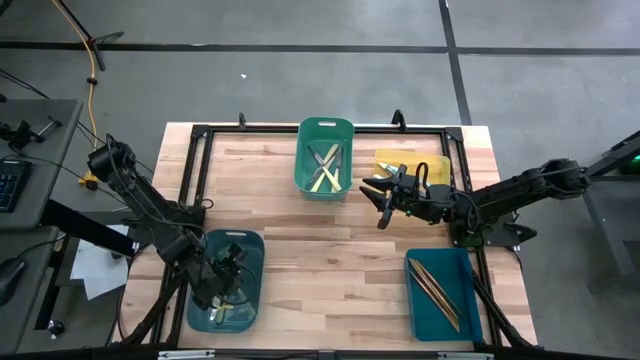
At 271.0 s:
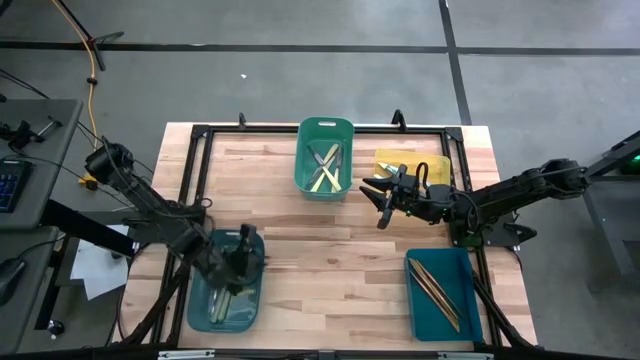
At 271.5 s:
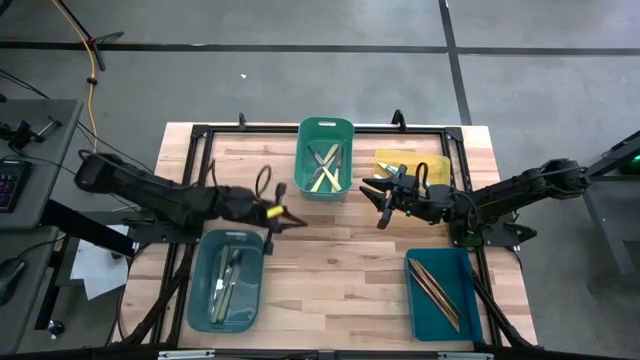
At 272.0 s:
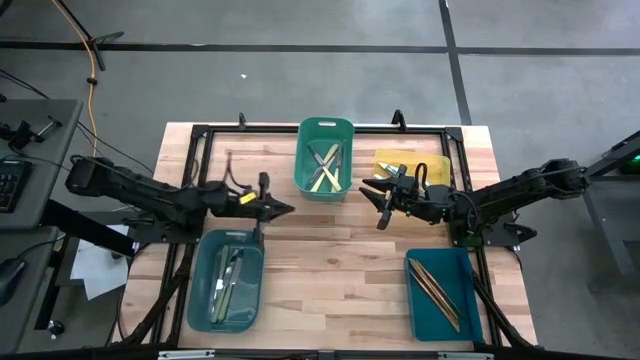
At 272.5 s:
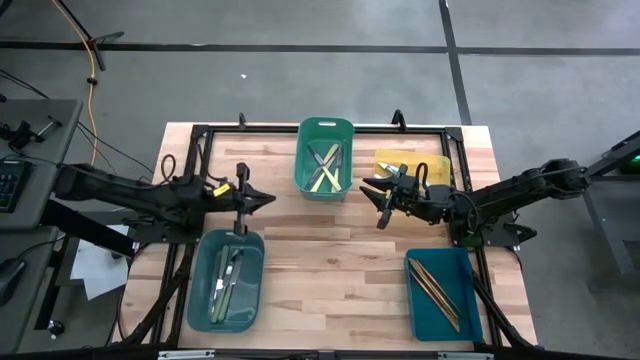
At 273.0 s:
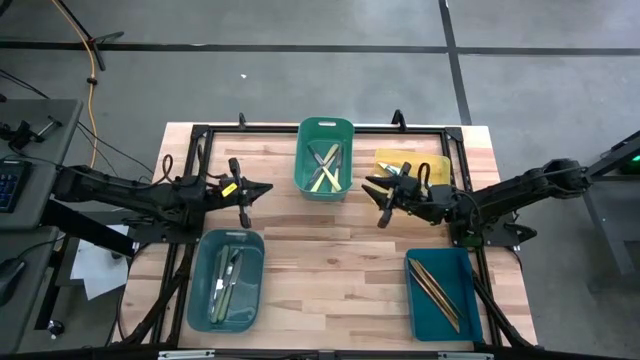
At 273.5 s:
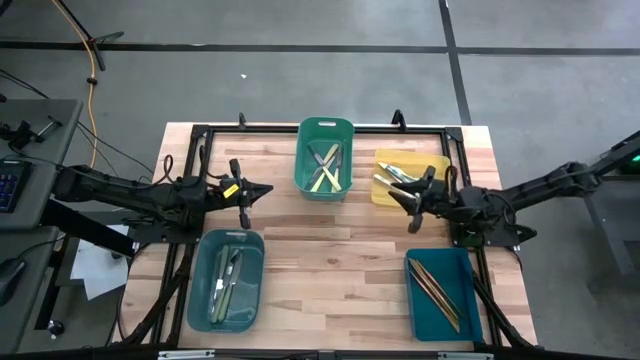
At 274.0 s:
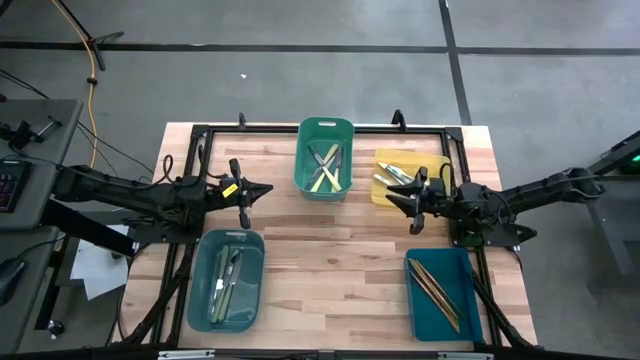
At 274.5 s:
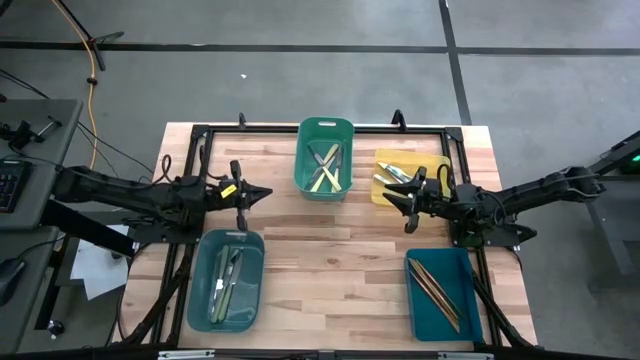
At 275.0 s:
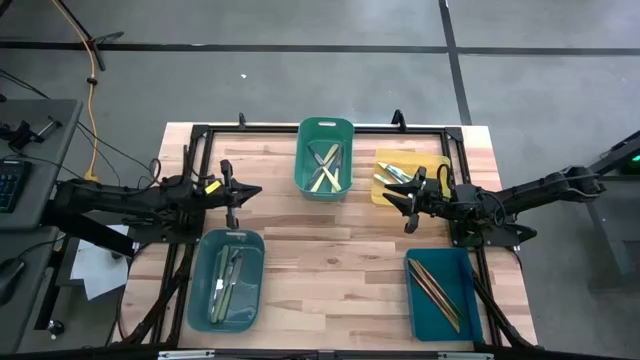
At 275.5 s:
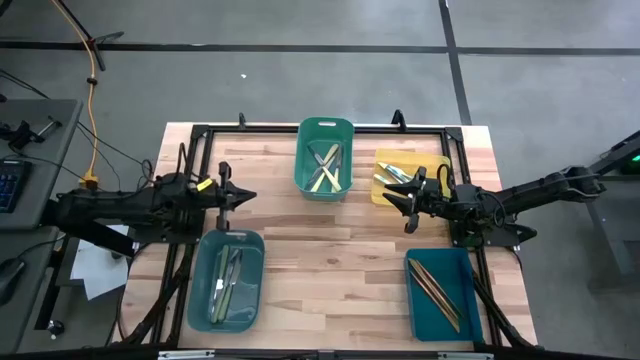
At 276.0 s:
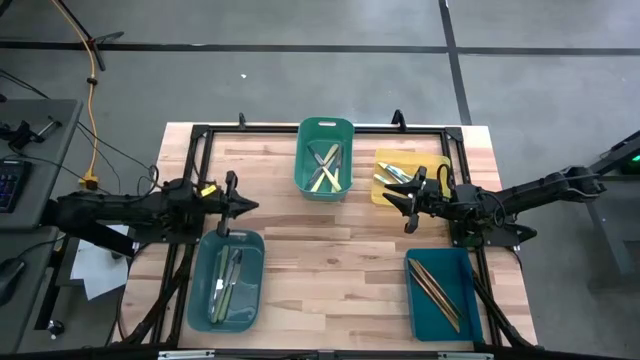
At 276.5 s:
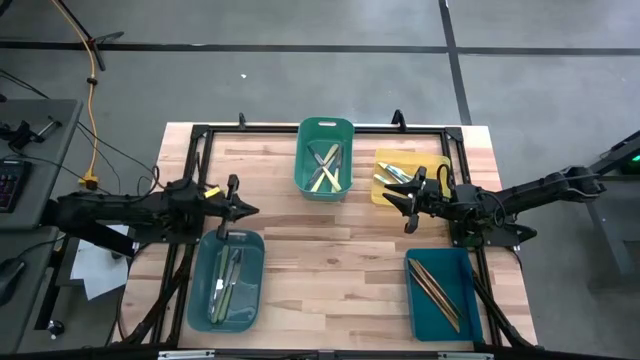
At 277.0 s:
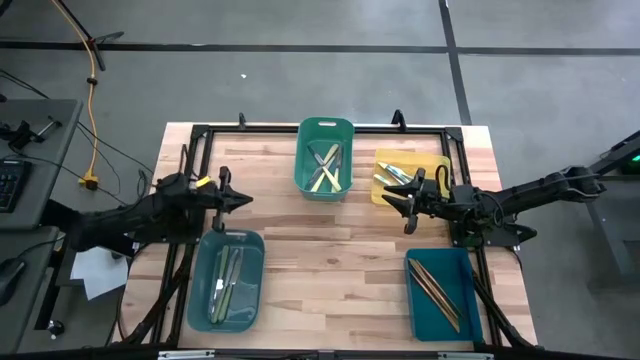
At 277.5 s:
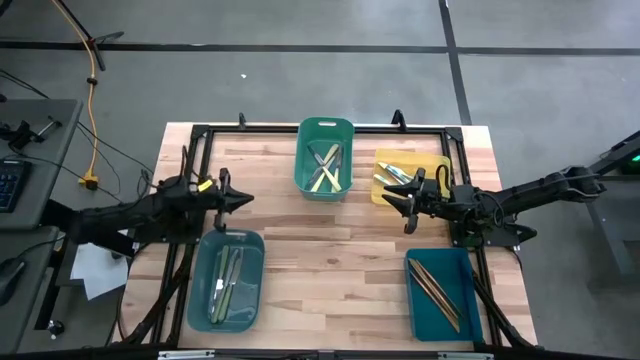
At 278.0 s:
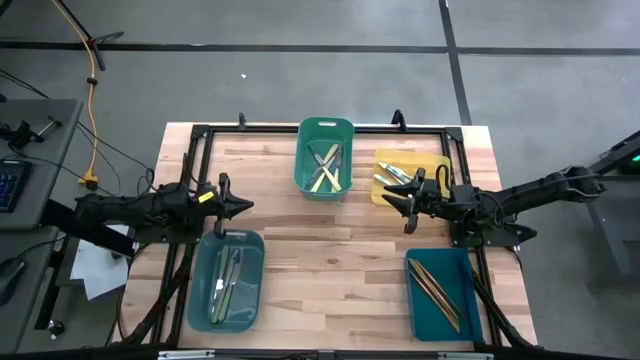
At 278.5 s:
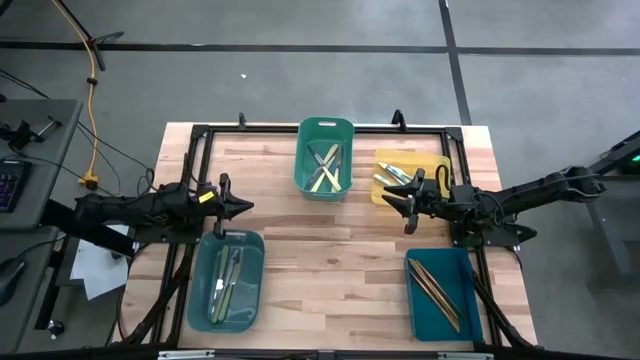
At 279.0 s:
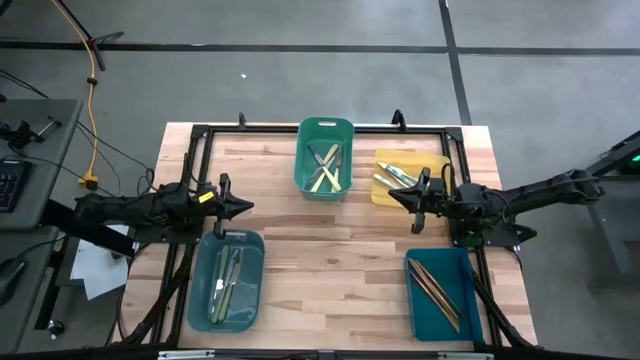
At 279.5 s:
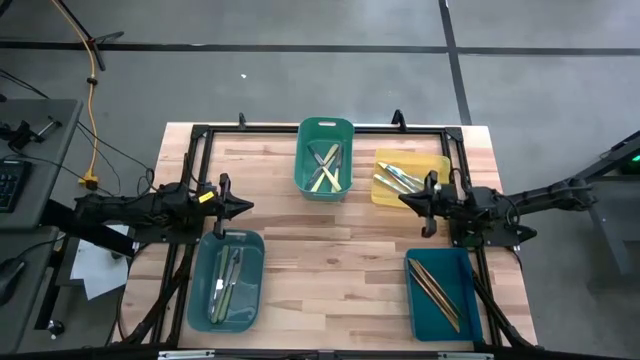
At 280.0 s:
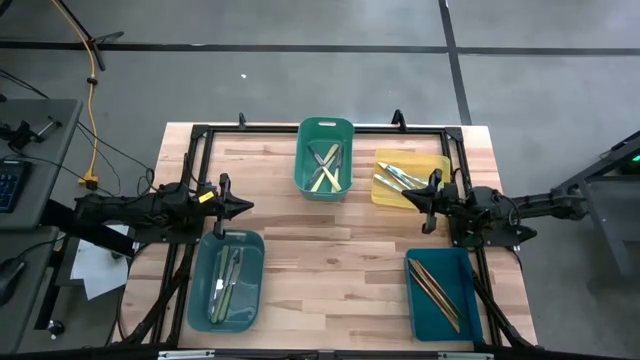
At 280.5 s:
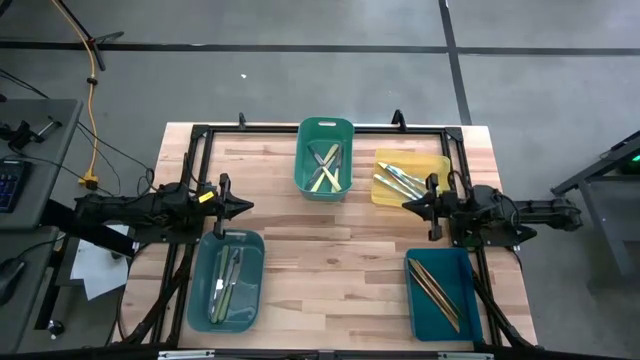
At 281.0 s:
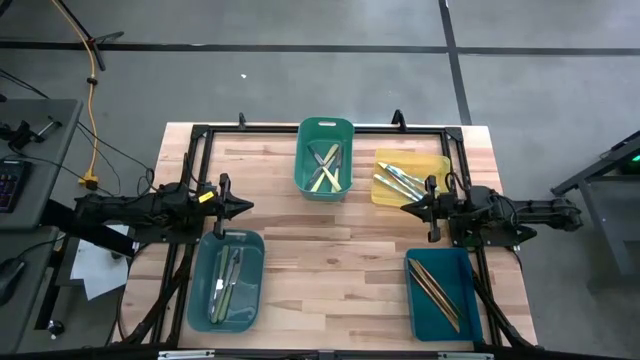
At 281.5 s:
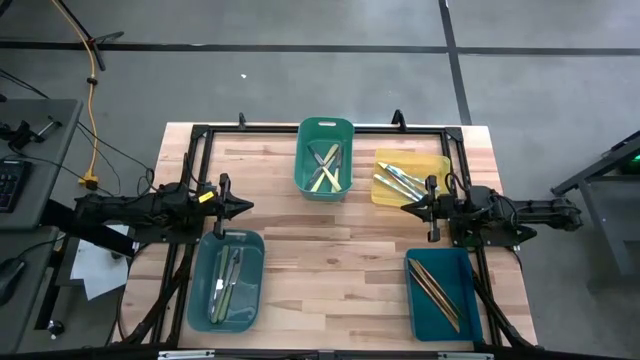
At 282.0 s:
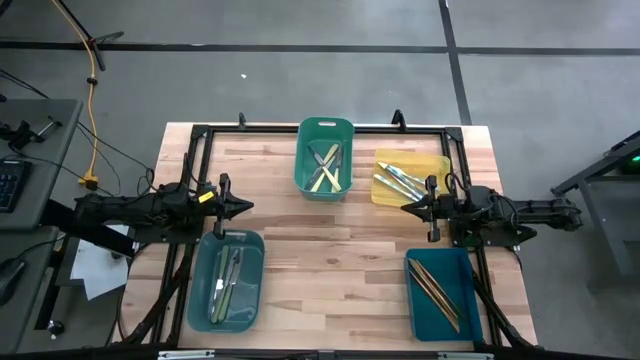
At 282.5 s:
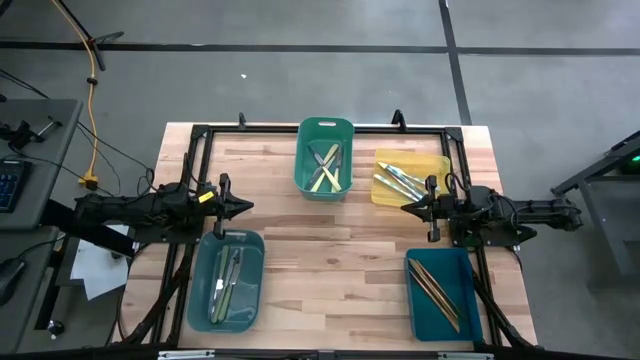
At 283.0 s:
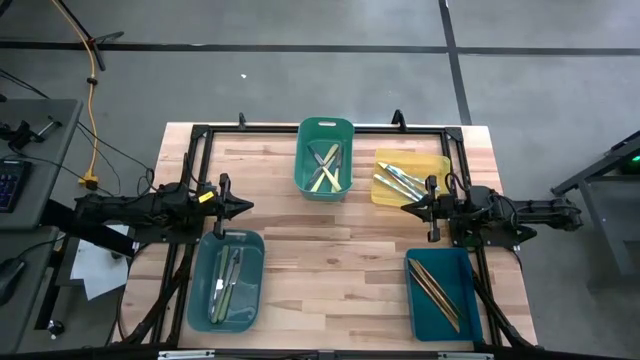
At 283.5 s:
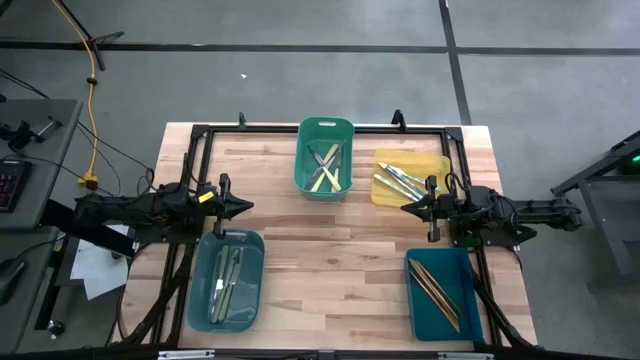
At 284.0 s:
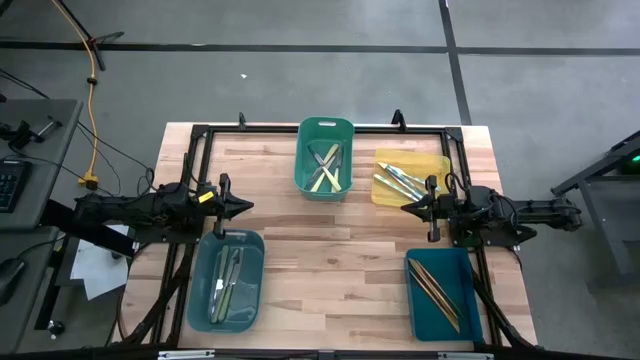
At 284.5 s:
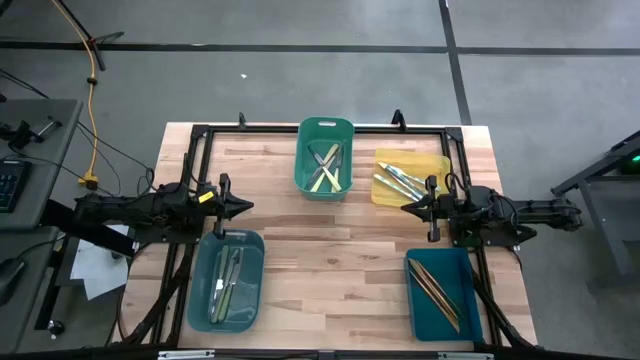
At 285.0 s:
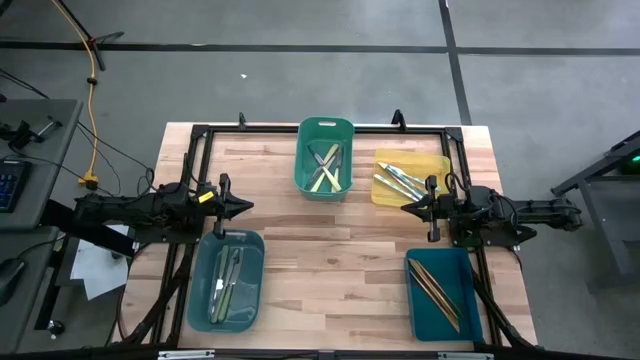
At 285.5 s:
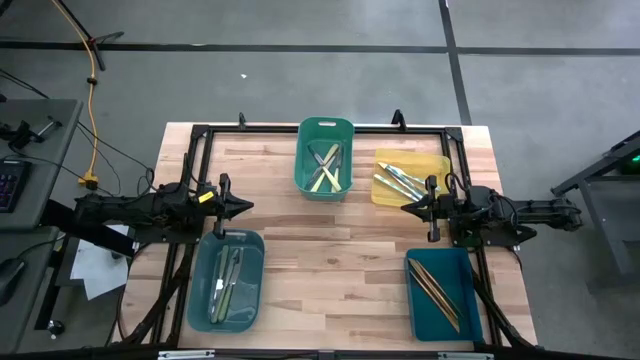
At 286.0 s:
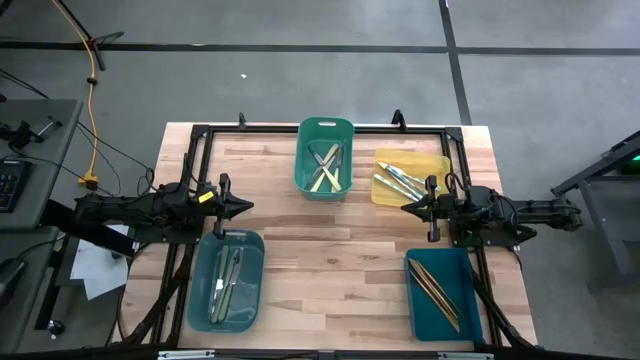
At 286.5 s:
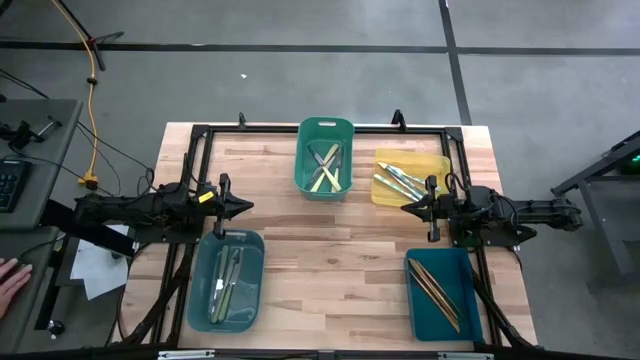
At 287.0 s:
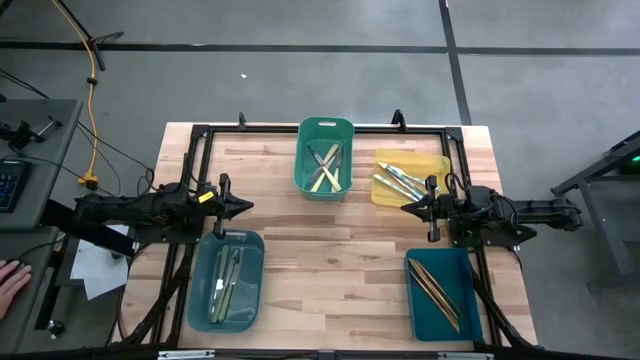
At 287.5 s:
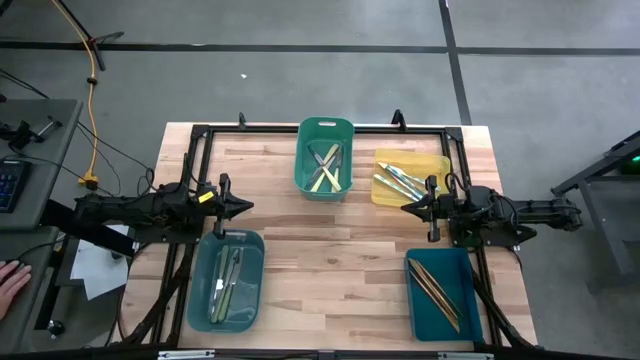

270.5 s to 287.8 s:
Task: Sort silverware by color (type)
Return to Home Position
